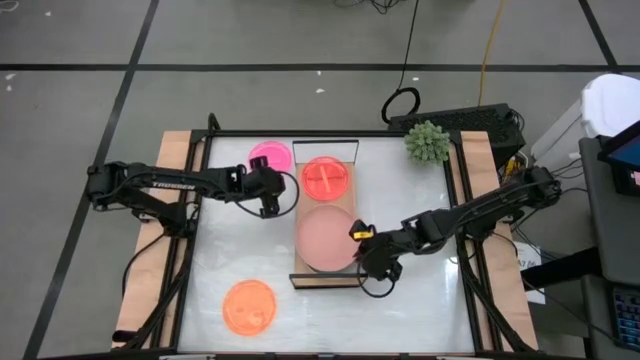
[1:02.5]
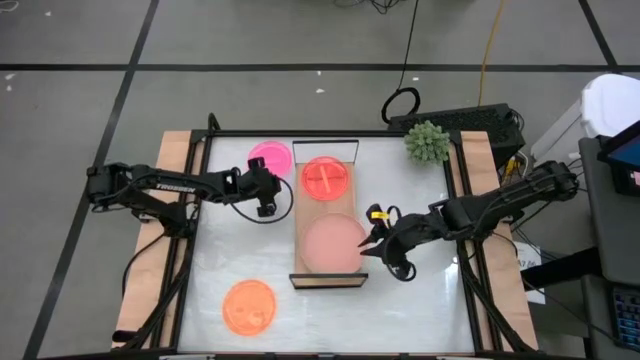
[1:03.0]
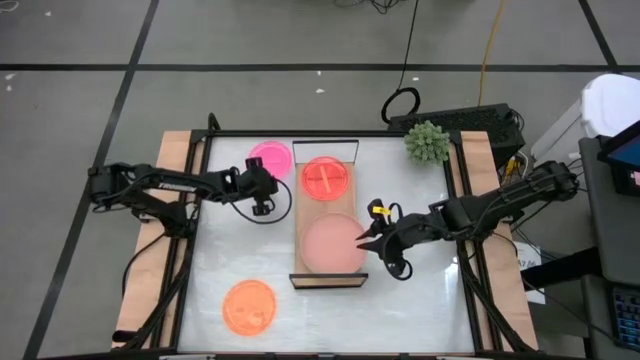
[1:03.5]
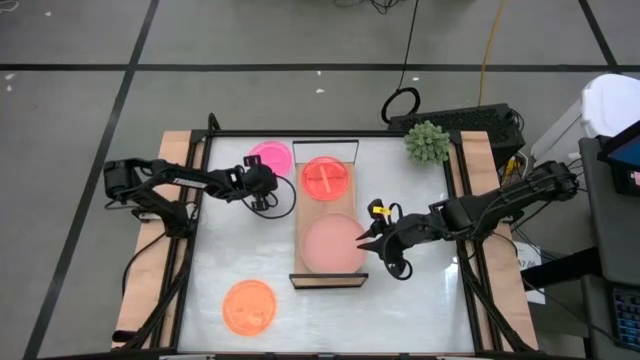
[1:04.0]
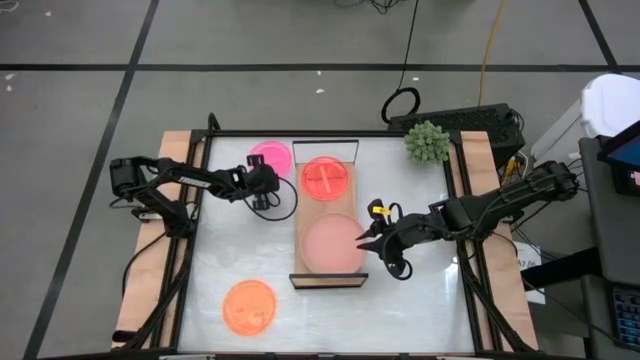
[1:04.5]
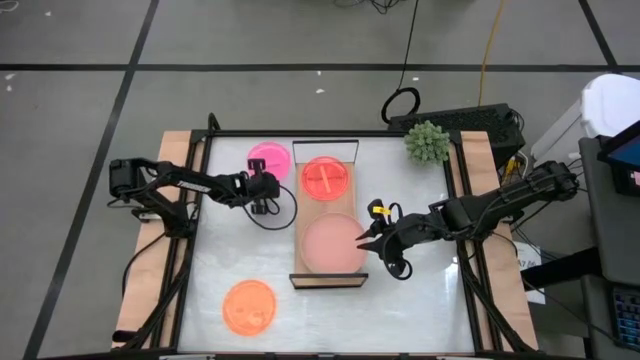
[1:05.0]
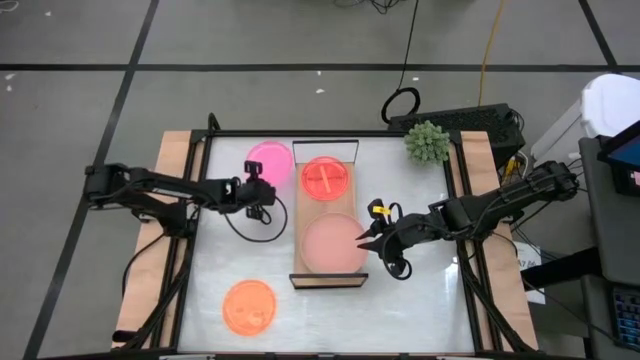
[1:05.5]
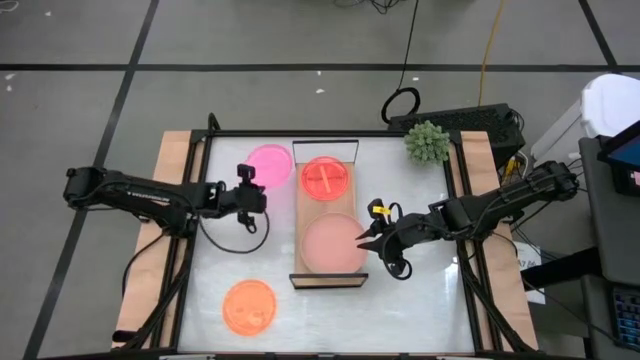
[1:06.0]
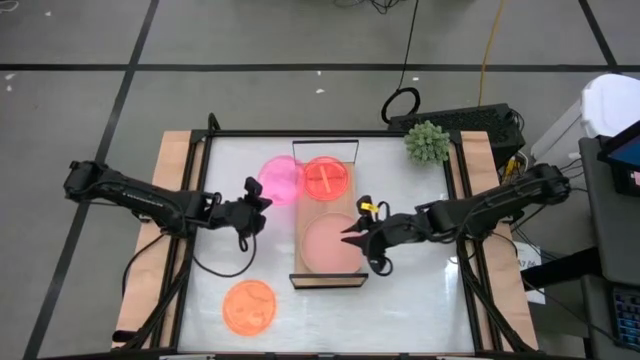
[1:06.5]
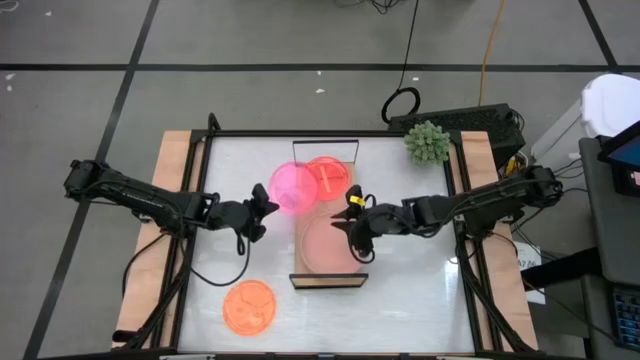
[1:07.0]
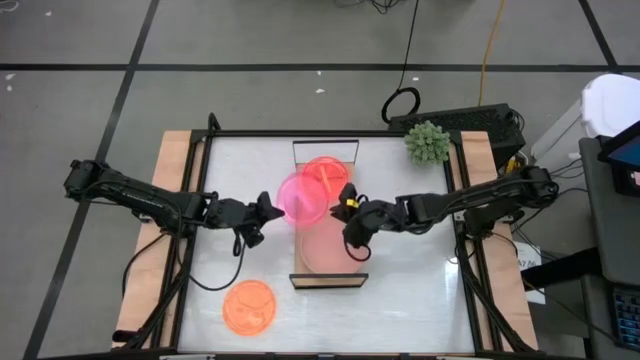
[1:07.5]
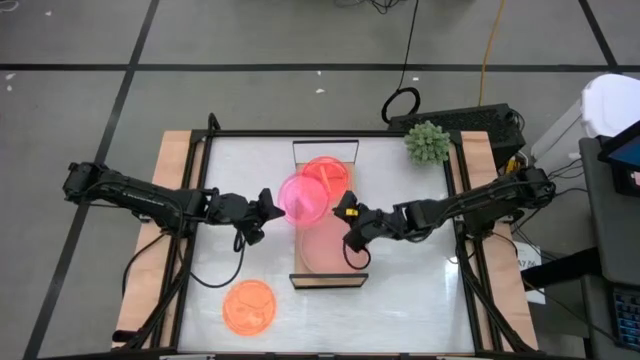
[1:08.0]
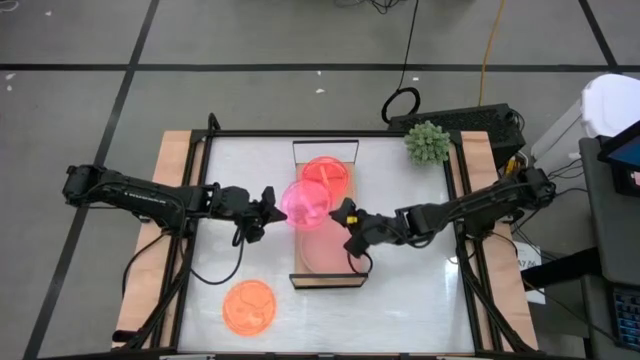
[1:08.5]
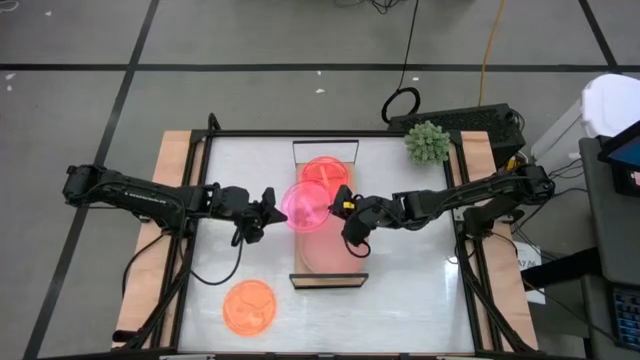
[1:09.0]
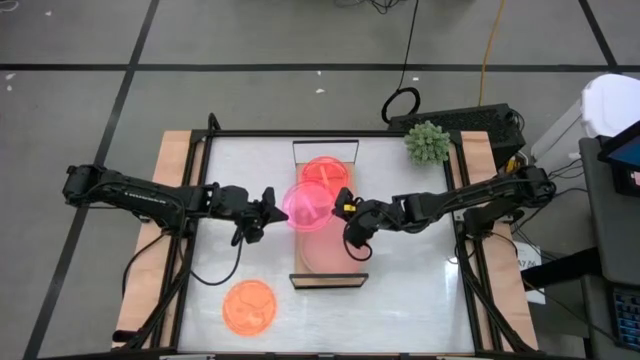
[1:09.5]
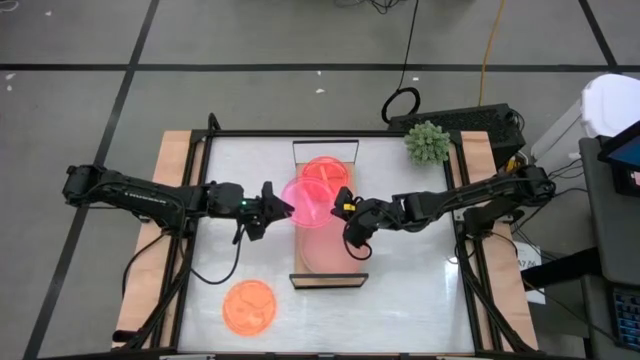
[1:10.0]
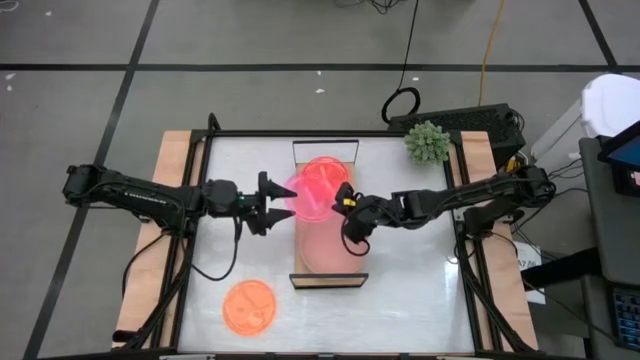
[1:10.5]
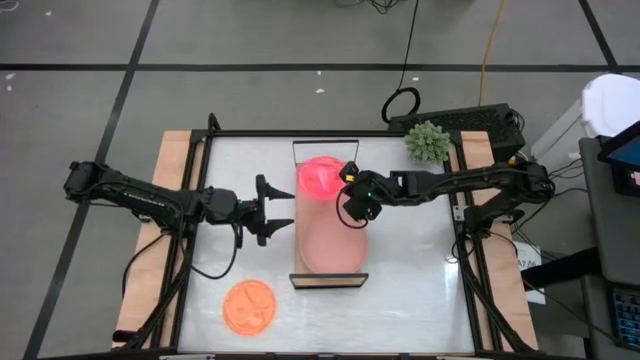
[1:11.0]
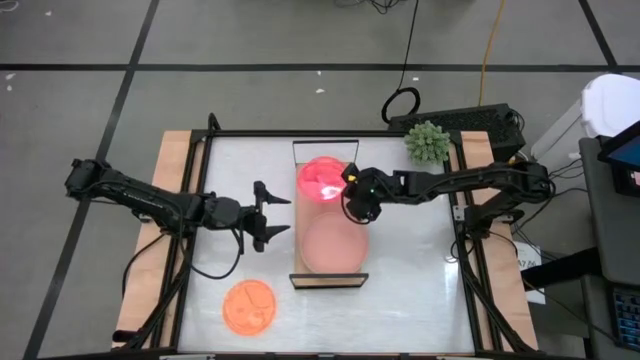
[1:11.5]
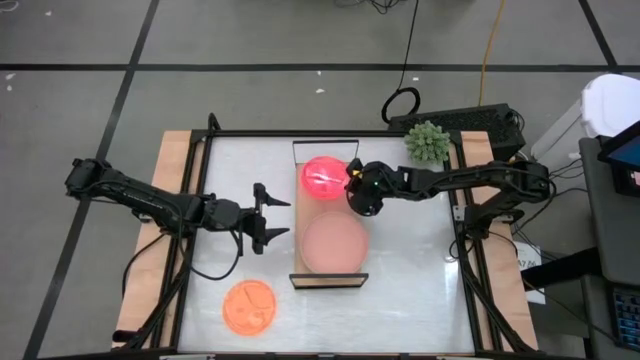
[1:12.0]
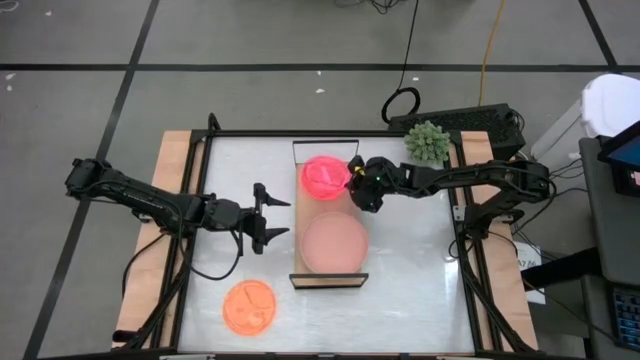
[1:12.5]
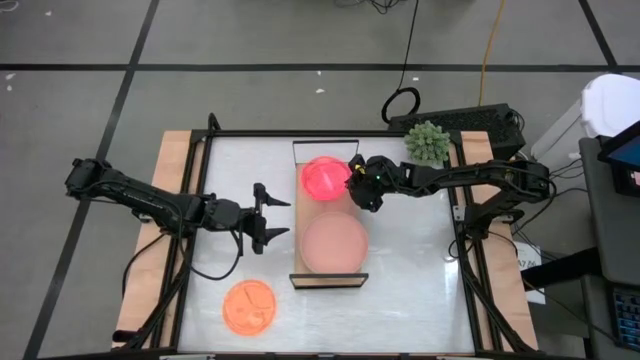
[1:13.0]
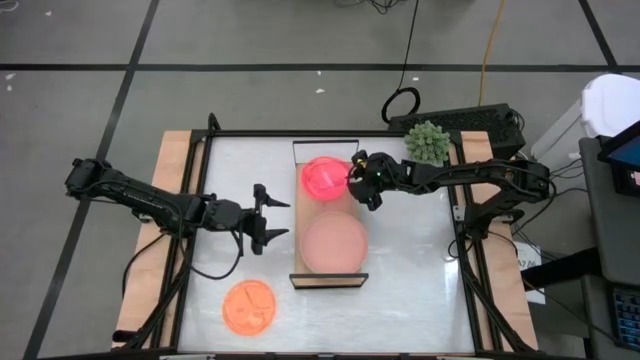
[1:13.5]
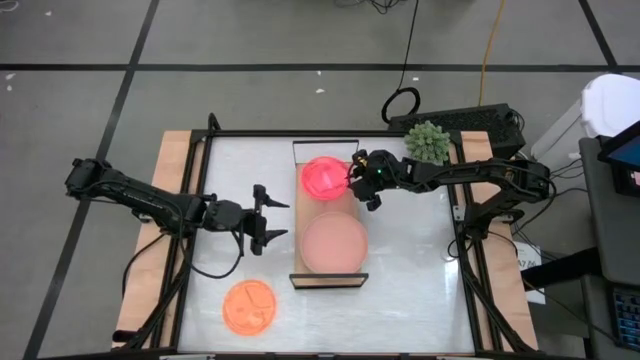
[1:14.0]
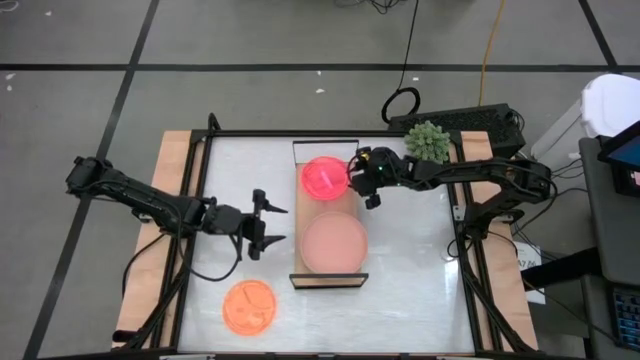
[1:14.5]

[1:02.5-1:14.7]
Task: Place and stack plates onto a shelf
Stack the pink plate on top of the orange plate on the shelf

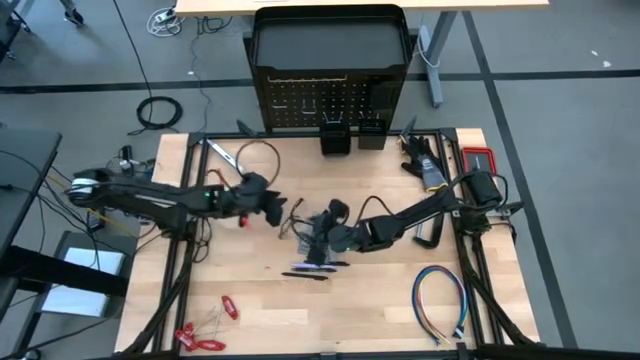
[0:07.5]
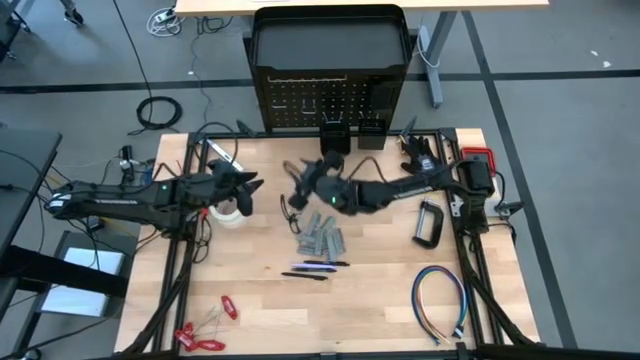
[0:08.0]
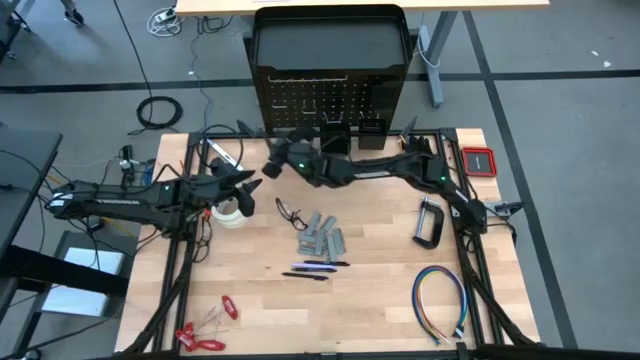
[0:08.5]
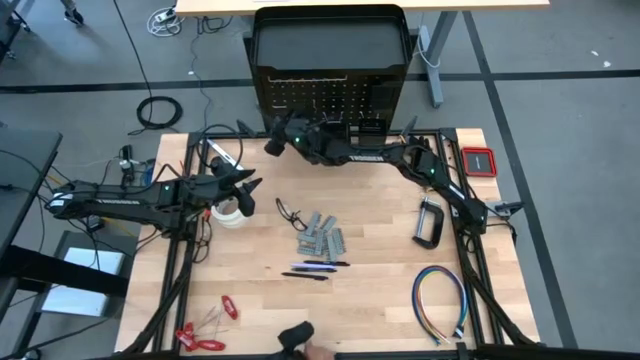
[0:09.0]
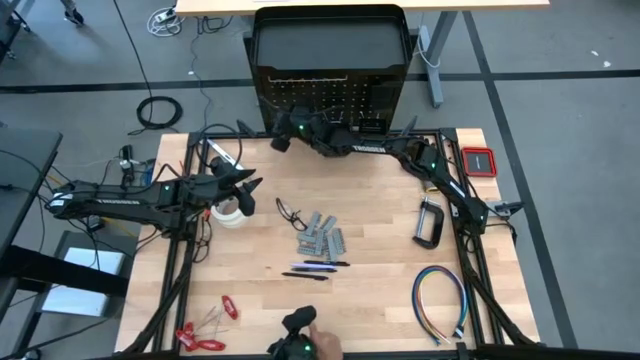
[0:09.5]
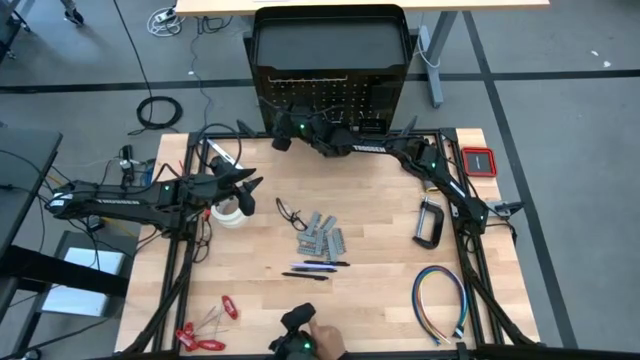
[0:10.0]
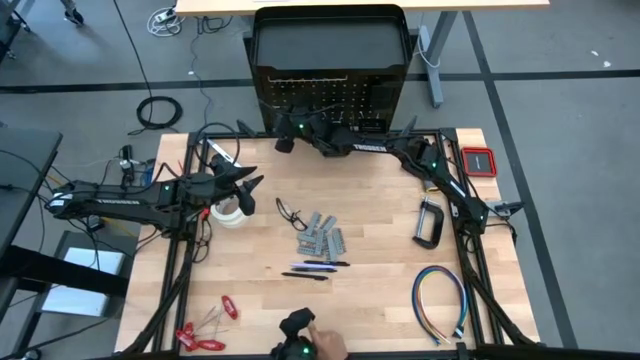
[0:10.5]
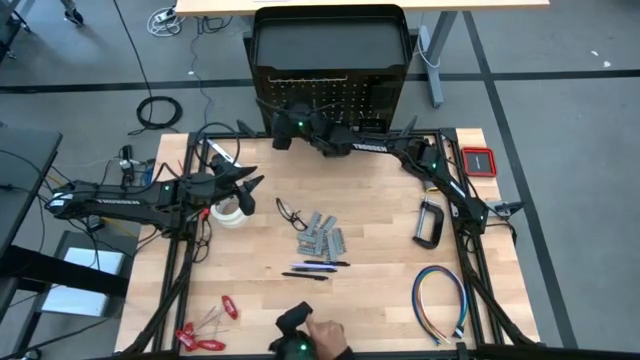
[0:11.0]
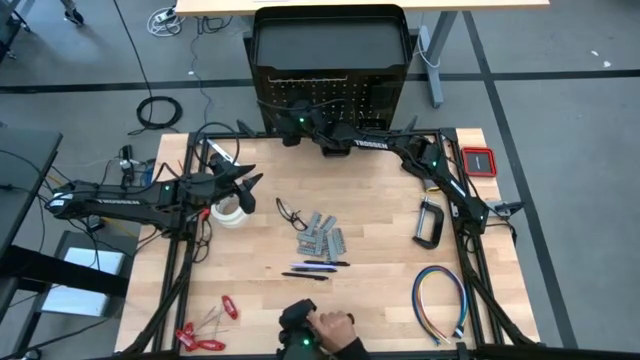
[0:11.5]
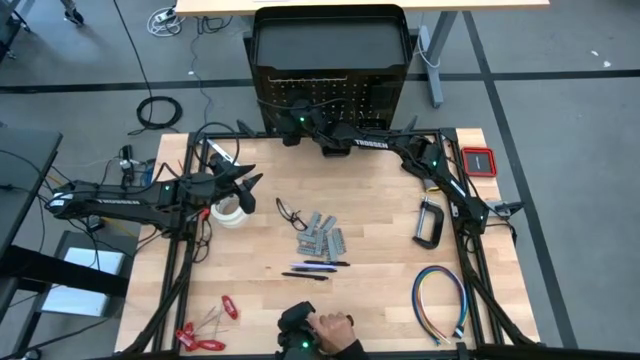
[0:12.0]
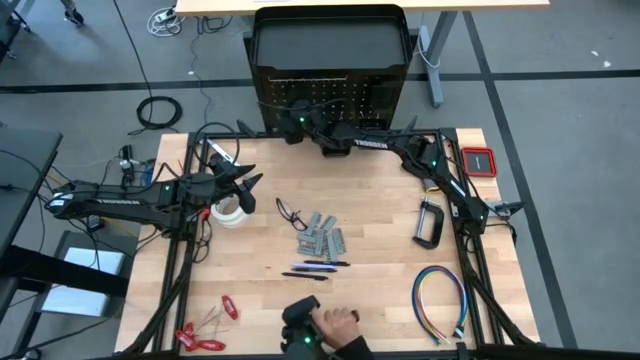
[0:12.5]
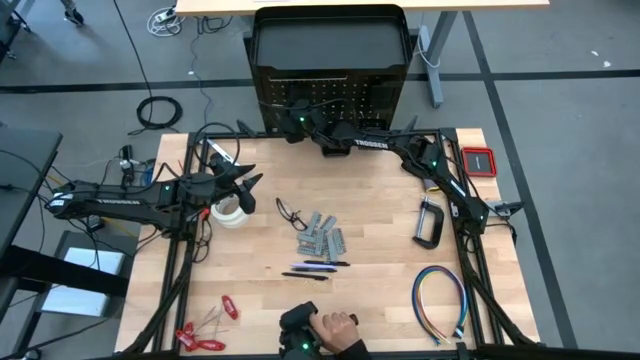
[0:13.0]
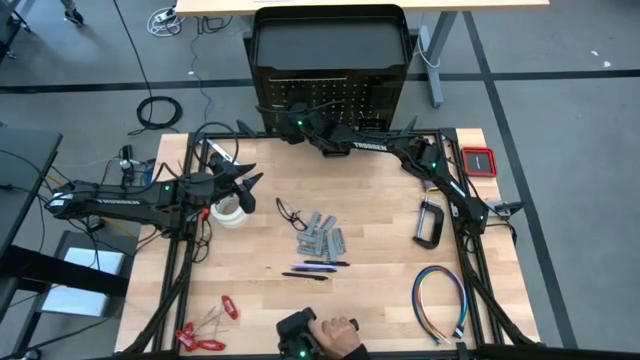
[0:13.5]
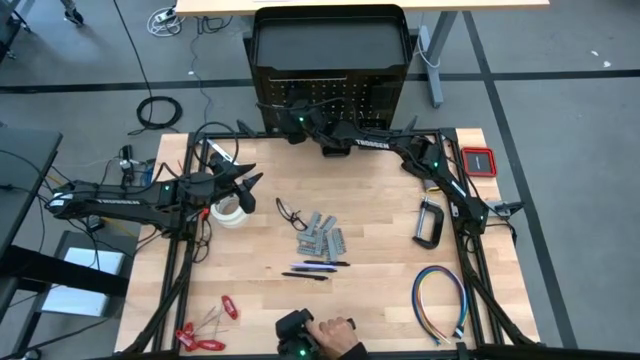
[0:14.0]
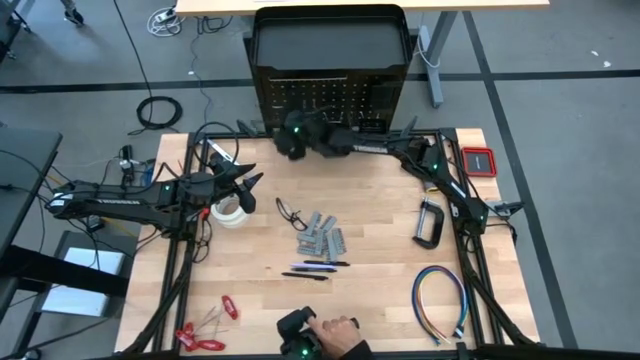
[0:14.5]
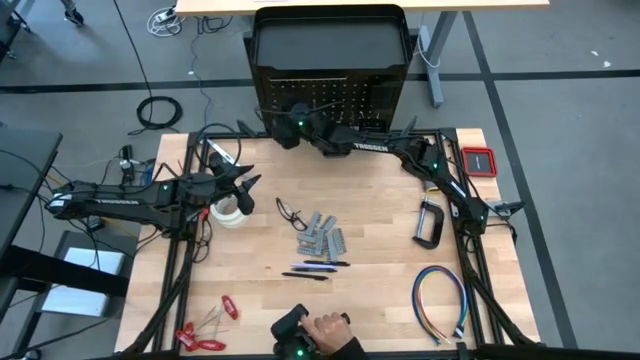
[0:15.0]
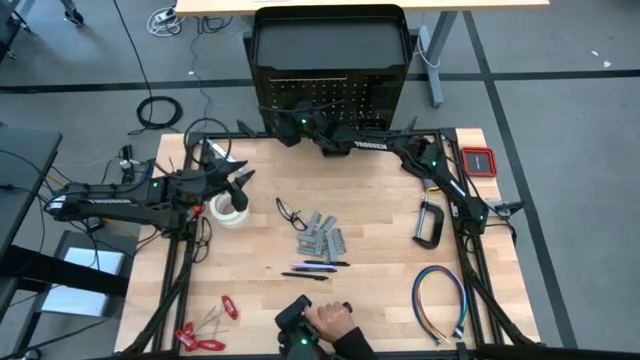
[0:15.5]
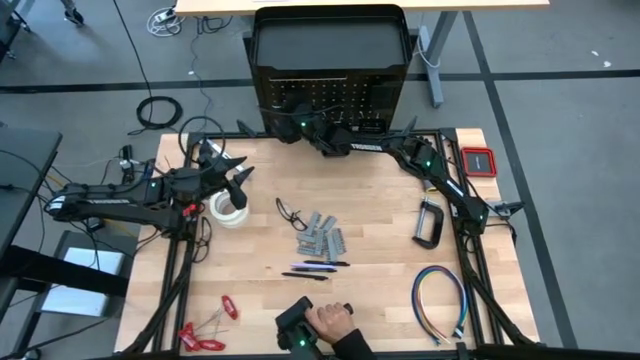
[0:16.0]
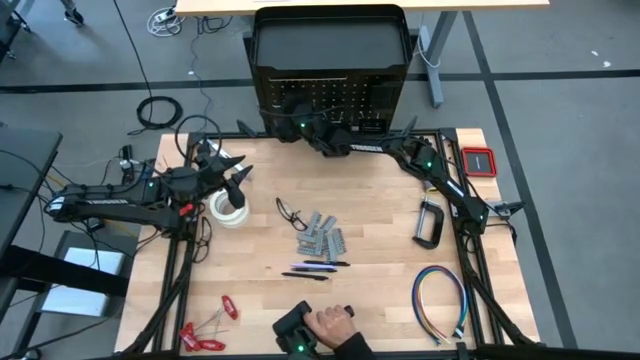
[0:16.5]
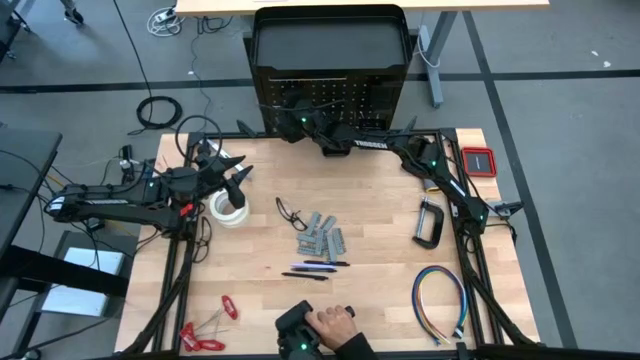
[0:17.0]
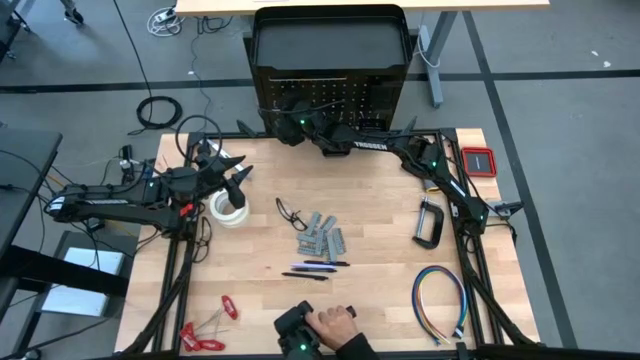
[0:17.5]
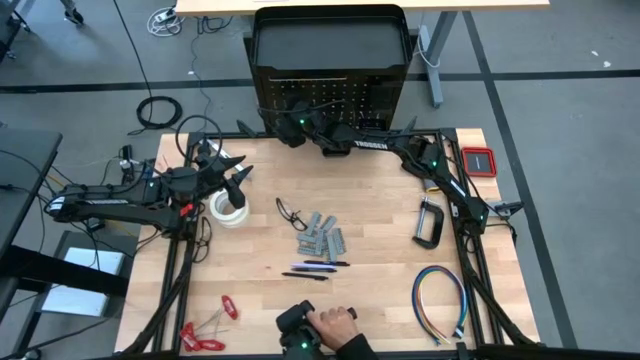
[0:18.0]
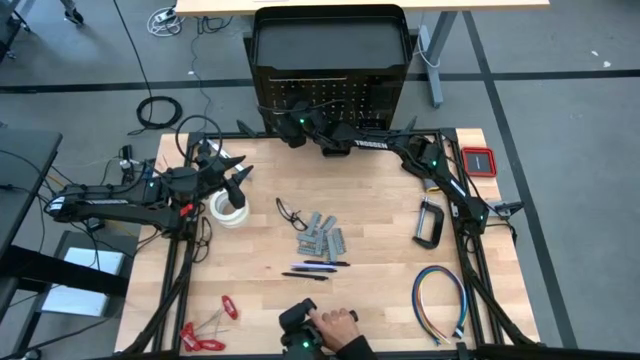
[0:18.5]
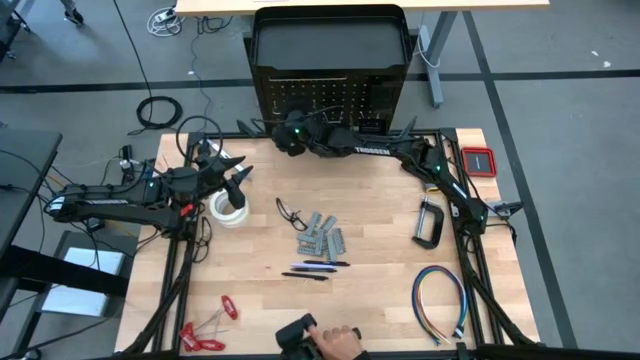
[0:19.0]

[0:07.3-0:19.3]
Task: Hang tools onto peg board
Adjust the binder clip on the peg board
